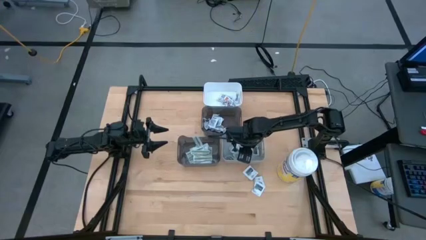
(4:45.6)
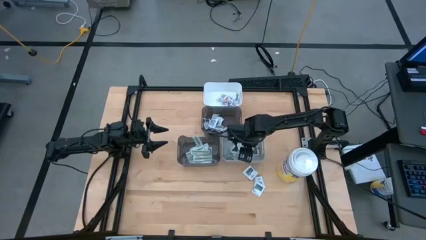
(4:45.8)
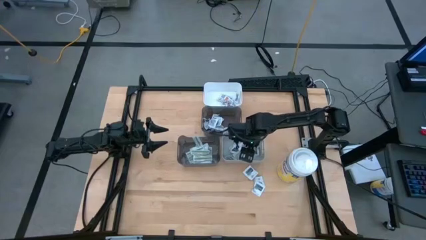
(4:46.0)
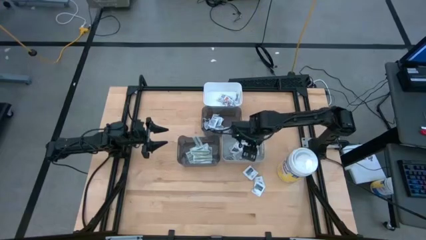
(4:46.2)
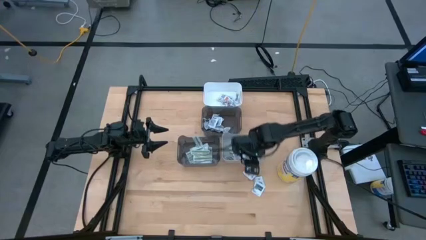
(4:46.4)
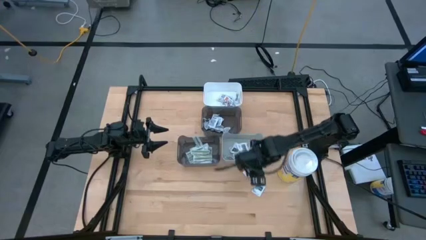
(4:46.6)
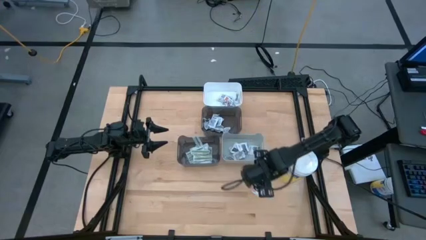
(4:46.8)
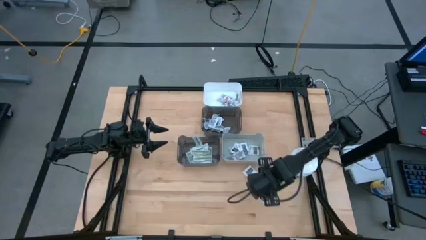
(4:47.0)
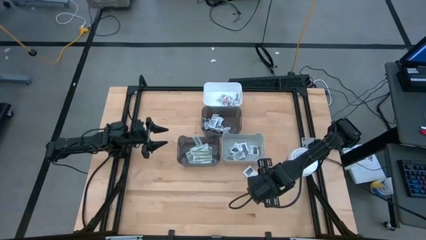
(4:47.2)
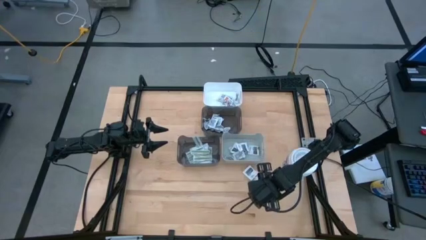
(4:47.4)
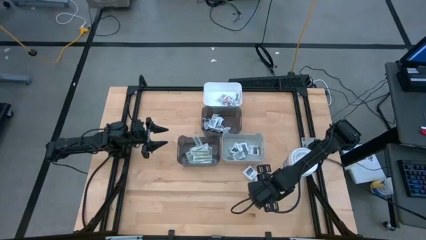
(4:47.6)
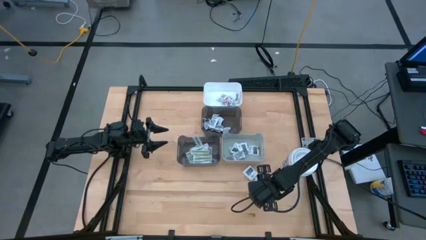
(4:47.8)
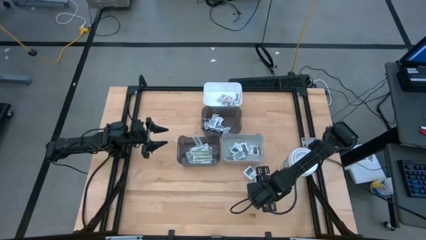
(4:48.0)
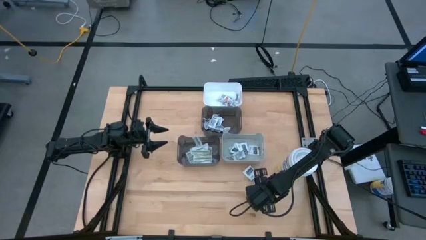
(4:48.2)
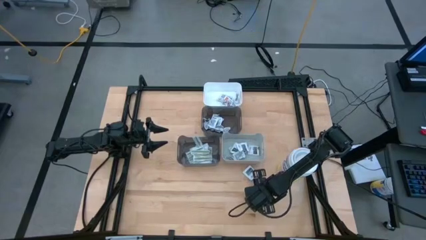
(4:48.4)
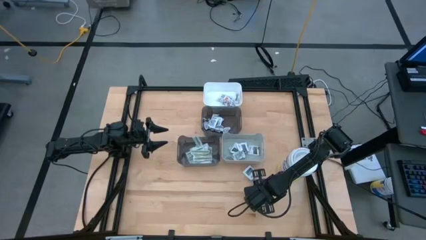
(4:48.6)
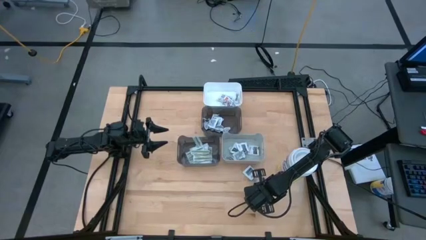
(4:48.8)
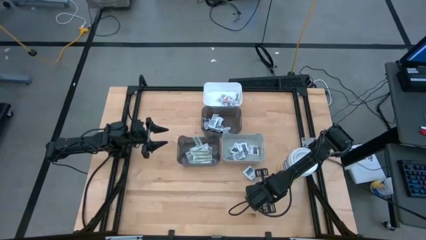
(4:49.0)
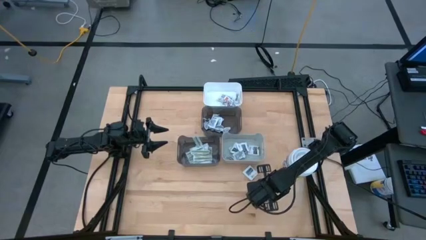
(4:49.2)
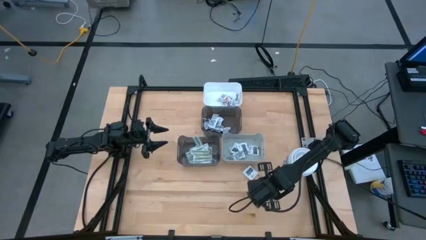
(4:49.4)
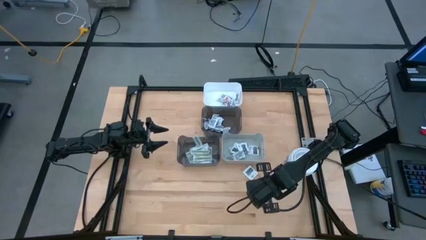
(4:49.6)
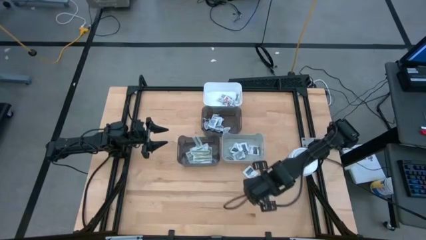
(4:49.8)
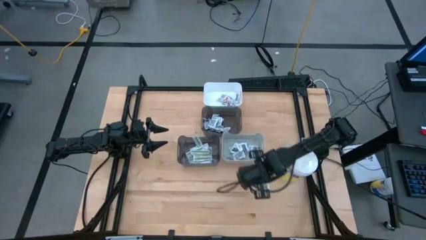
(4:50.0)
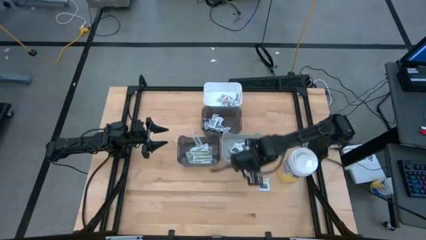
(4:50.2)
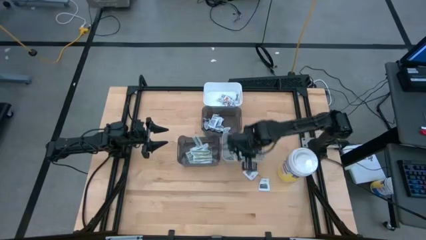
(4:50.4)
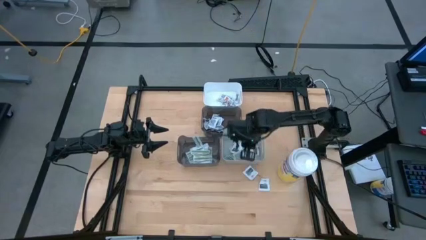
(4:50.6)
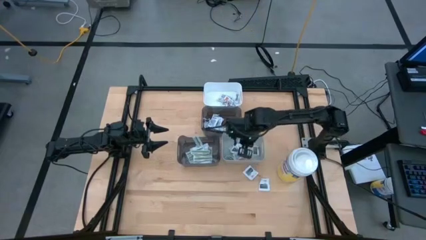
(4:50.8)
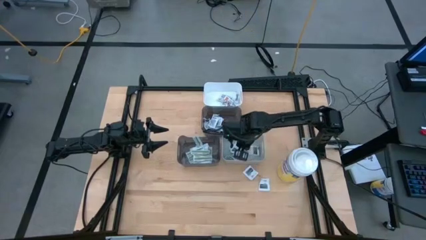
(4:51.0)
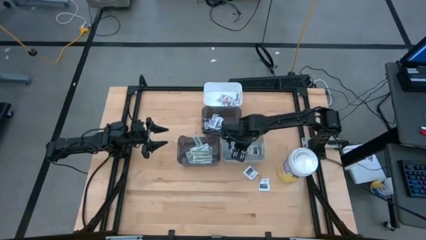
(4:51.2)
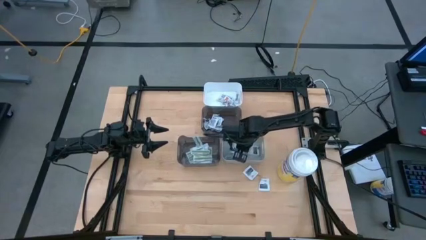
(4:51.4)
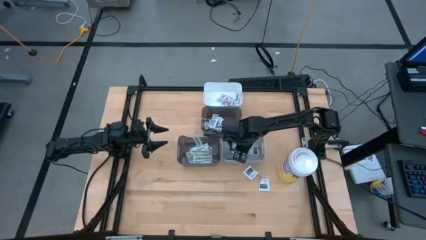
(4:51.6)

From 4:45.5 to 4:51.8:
Task: Pick & Place First Aid Supplies
Put the white towelette pack into the gray bin

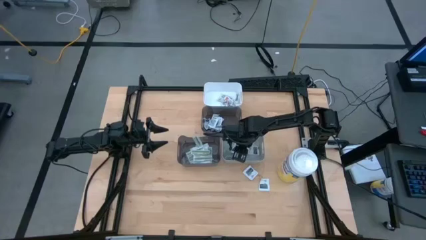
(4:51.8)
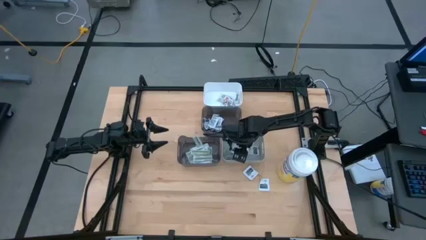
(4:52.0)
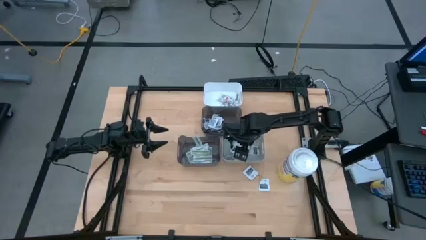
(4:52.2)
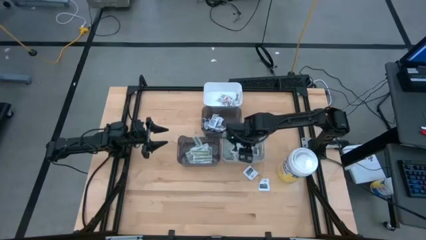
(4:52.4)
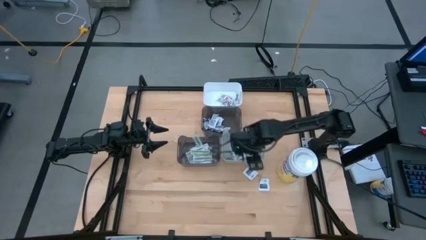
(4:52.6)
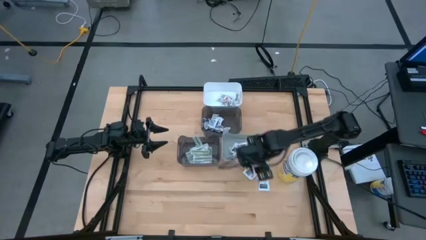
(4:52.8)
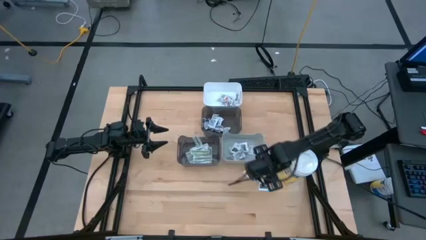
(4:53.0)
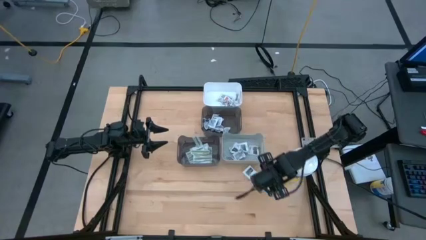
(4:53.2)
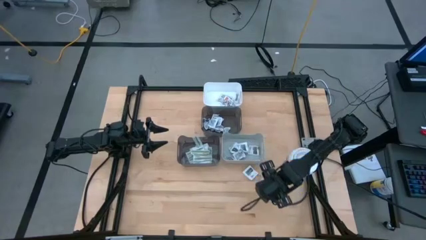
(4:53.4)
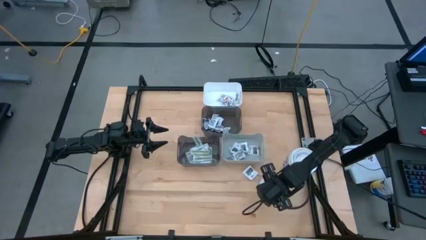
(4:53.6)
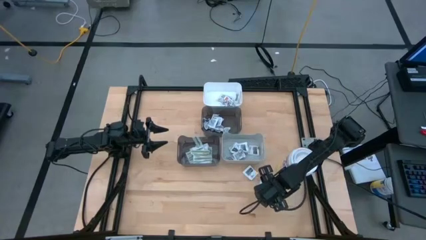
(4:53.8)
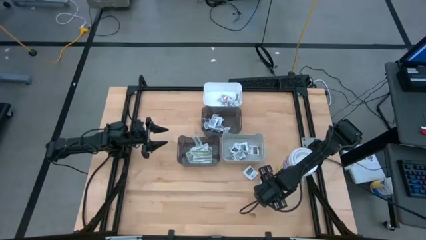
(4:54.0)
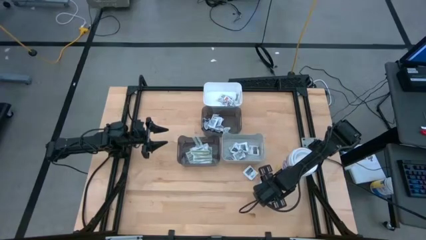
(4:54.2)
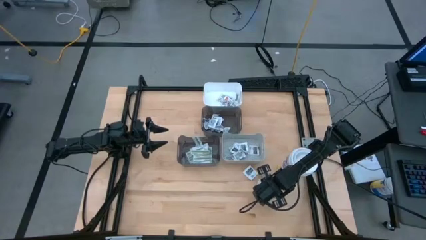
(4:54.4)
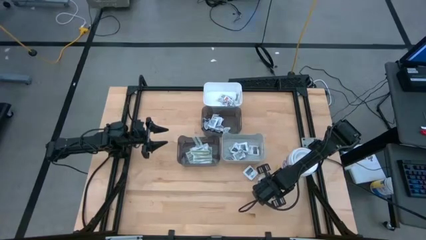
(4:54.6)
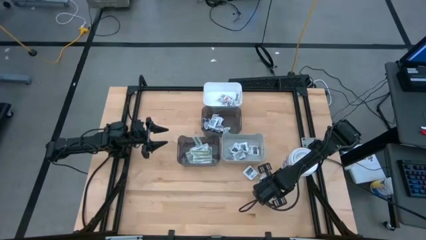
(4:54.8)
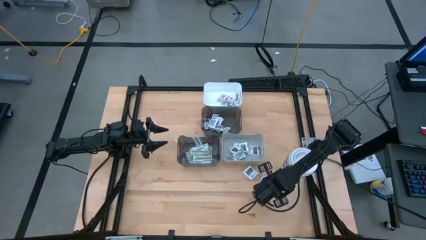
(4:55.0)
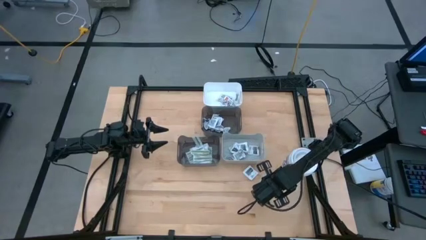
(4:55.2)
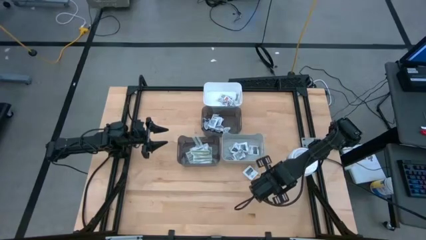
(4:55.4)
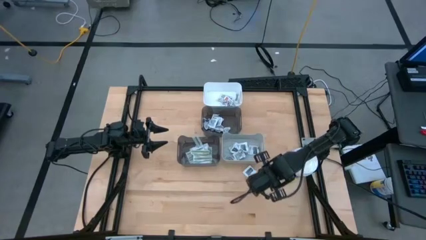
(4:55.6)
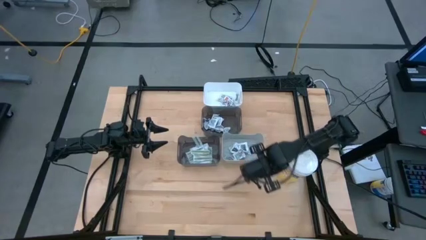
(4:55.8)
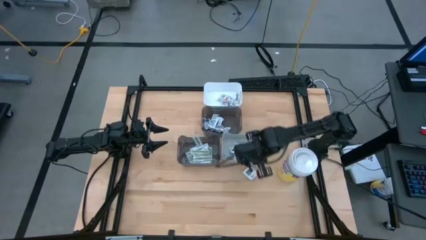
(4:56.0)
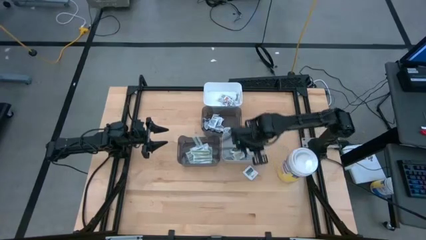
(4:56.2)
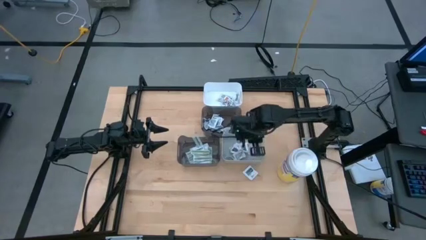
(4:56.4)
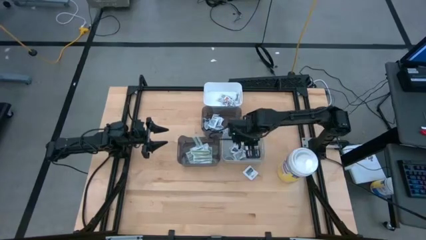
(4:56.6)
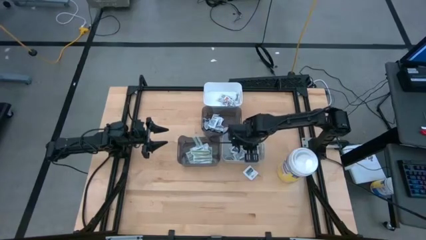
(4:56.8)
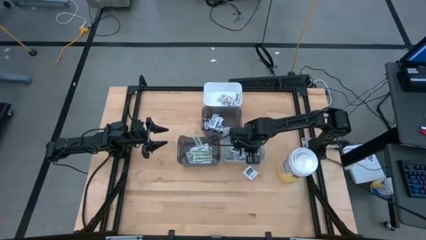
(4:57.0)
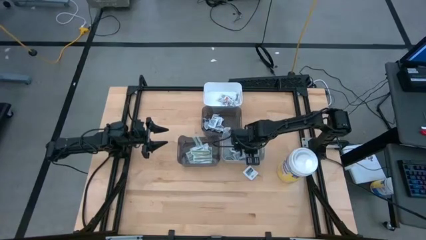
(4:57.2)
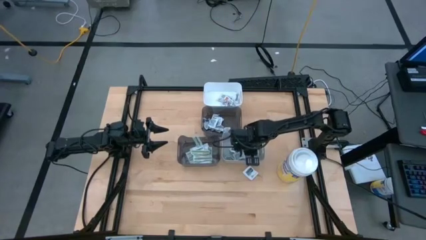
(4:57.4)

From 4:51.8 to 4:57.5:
Put the white towelette pack into the gray bin

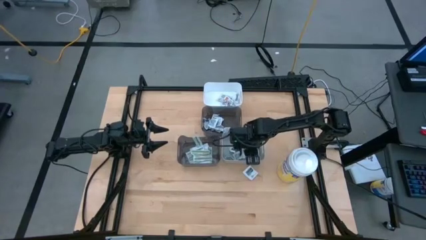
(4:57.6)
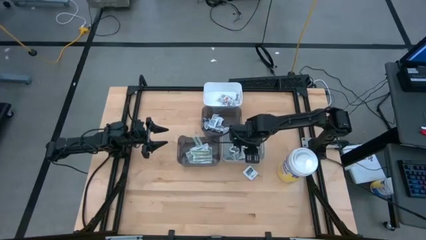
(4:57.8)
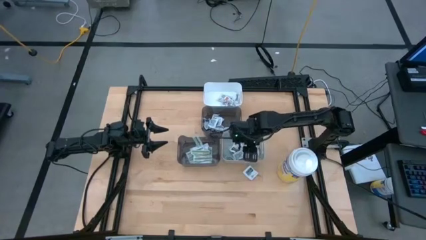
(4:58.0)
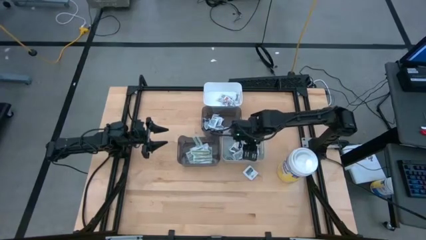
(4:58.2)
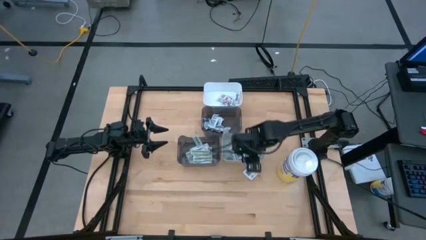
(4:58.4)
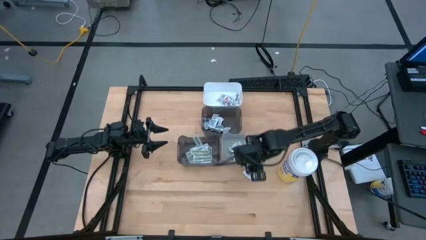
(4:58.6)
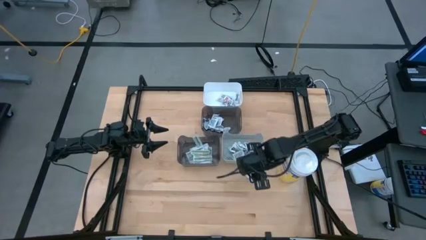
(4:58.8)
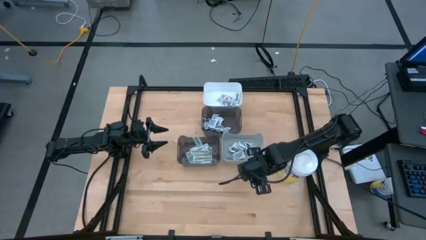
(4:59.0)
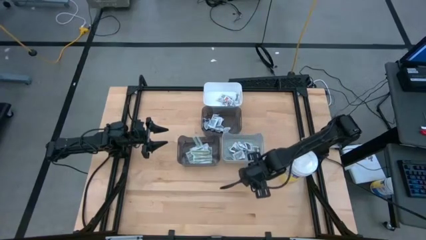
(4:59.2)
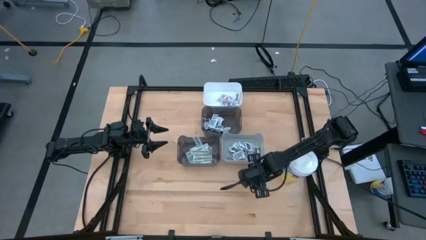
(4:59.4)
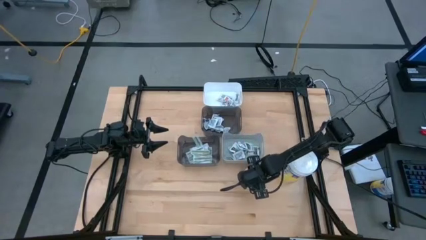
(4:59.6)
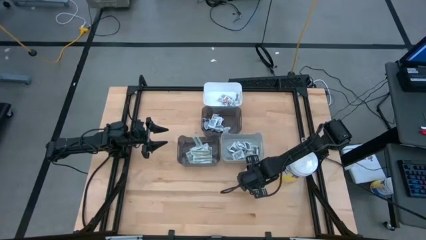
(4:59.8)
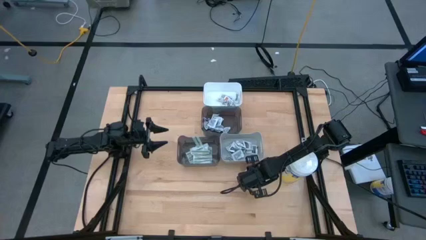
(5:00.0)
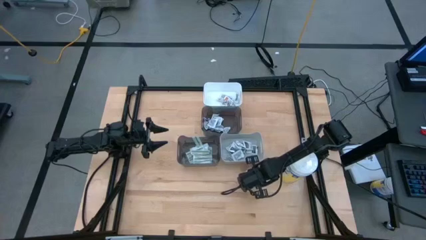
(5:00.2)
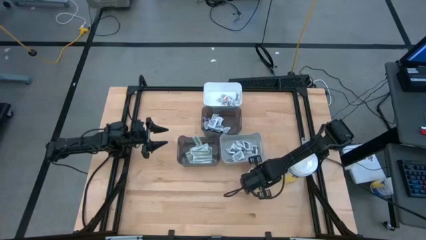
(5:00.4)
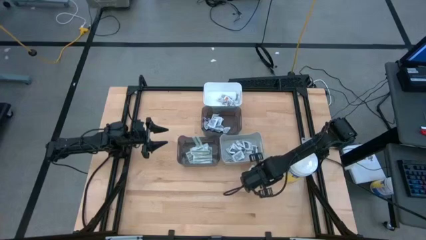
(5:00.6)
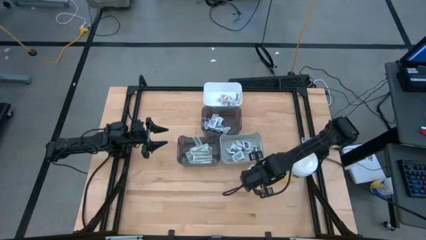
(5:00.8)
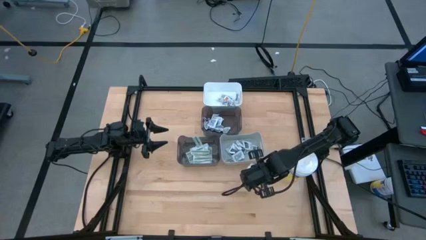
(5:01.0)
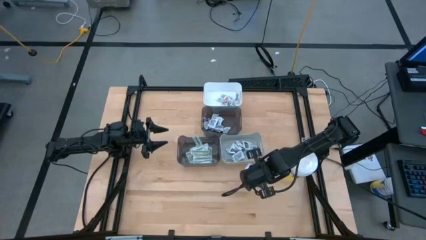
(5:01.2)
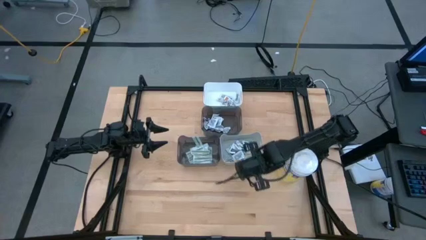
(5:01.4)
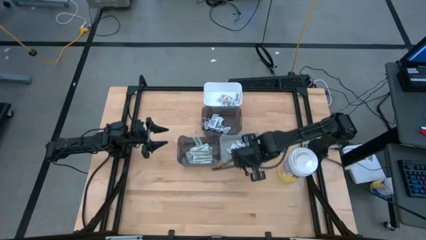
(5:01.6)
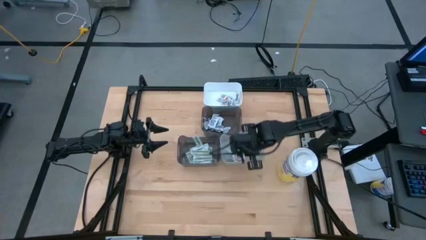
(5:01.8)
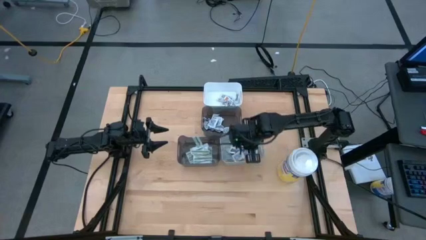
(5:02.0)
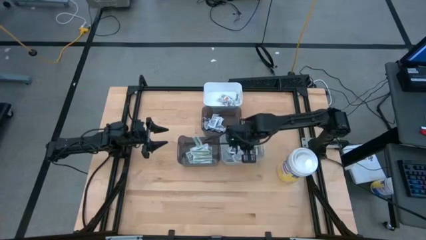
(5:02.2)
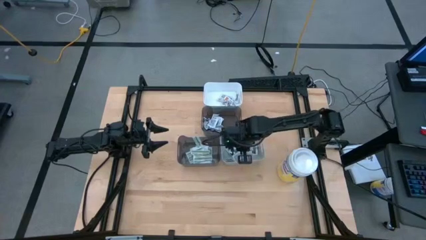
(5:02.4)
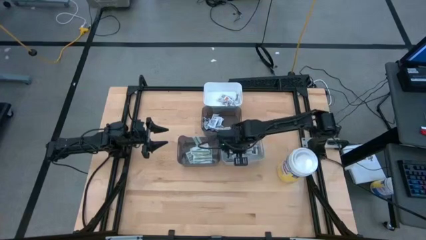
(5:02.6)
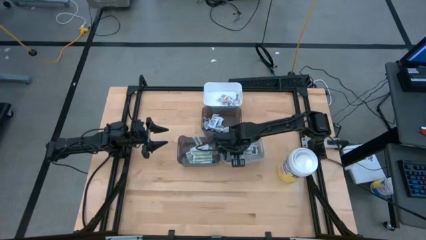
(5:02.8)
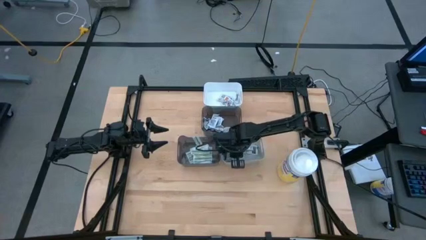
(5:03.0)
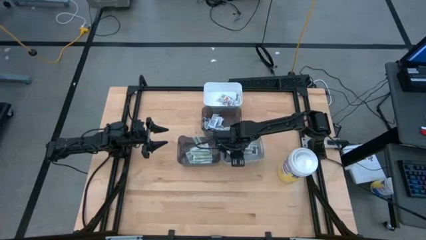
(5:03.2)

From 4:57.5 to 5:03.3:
Put the white towelette pack into the gray bin
